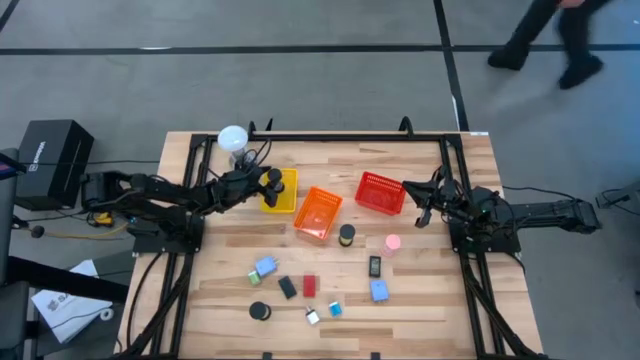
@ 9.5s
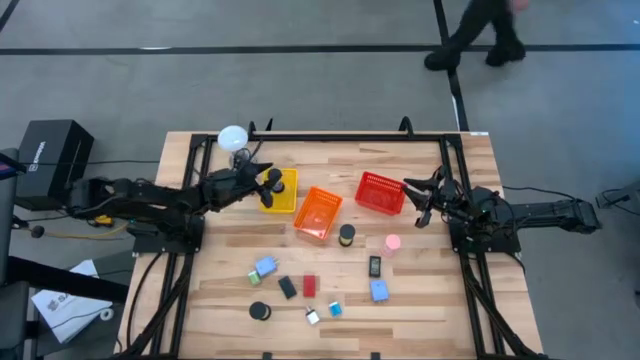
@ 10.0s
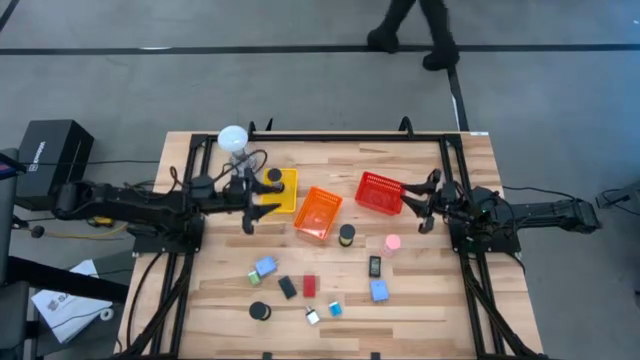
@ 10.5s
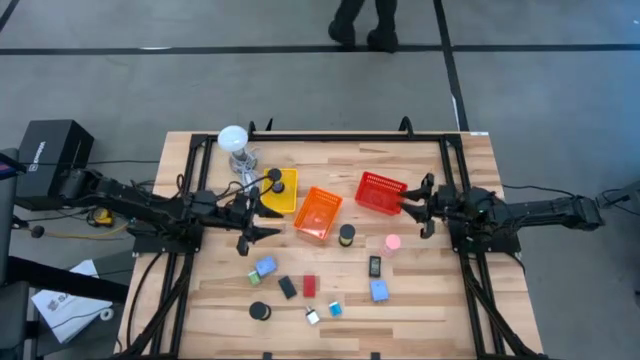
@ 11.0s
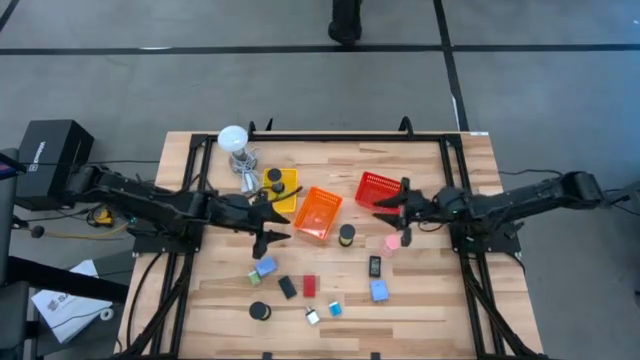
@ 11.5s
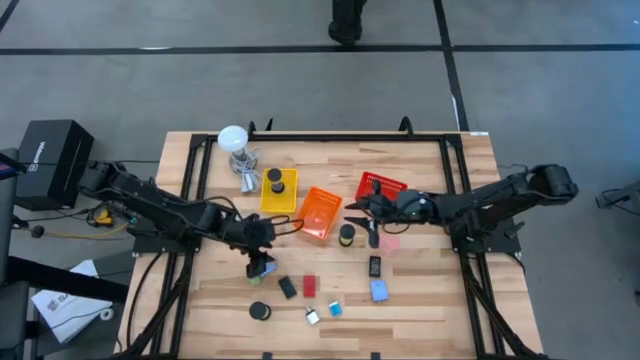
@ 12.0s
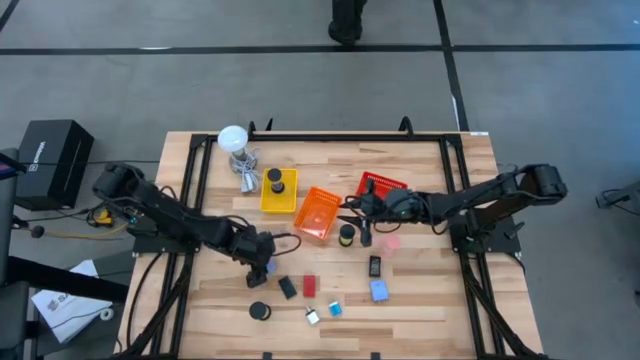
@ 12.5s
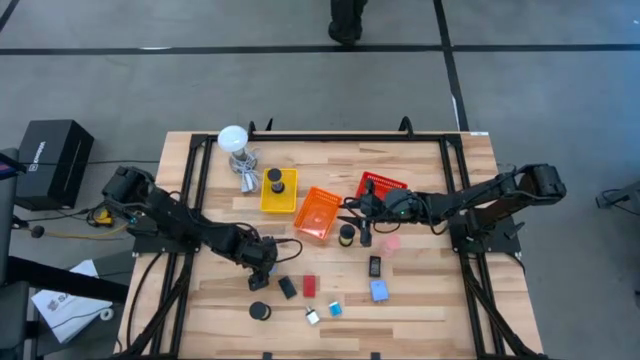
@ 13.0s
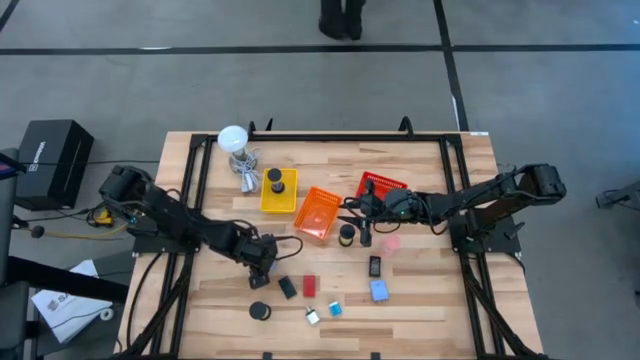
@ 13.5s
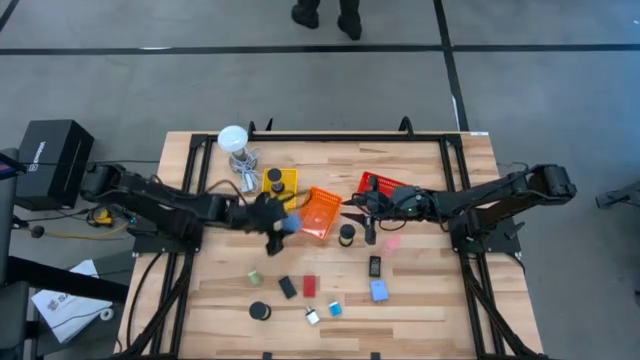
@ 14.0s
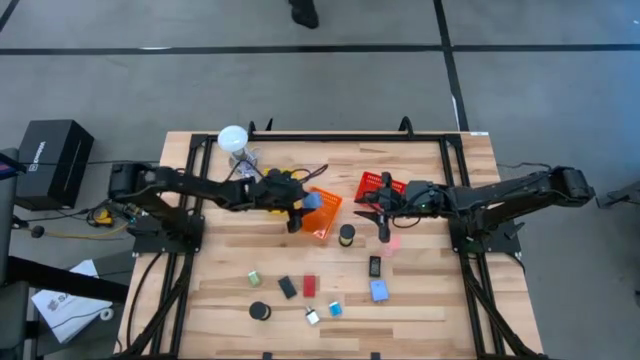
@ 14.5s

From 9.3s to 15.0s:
Task: Pick & Place Office items
Put the left light blue charger adapter into the orange bin

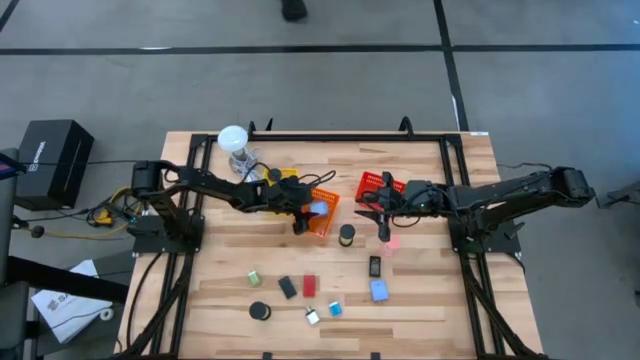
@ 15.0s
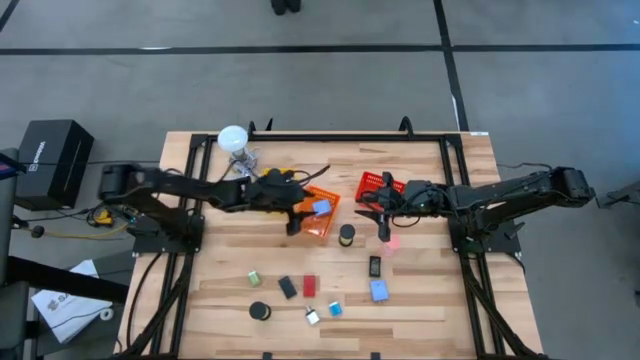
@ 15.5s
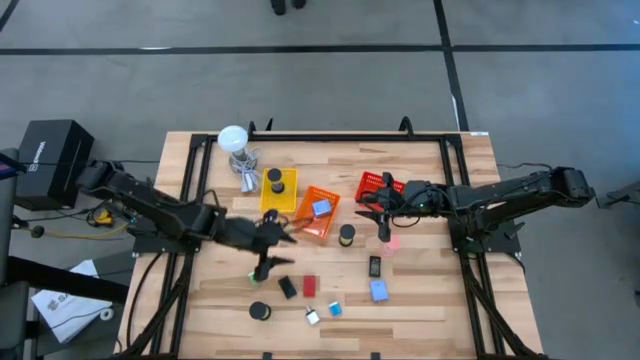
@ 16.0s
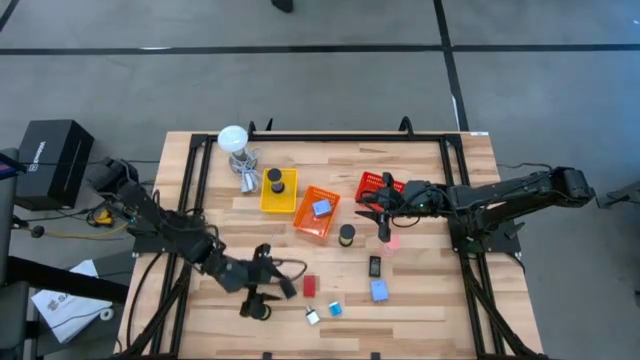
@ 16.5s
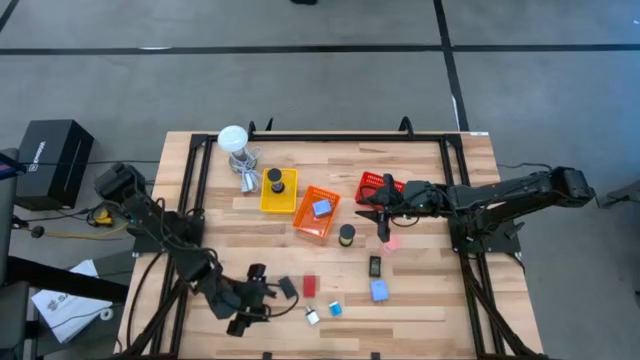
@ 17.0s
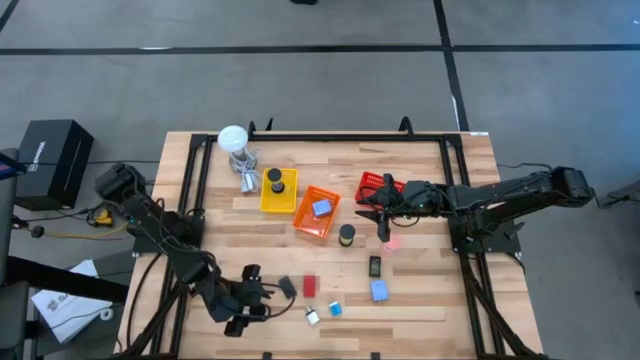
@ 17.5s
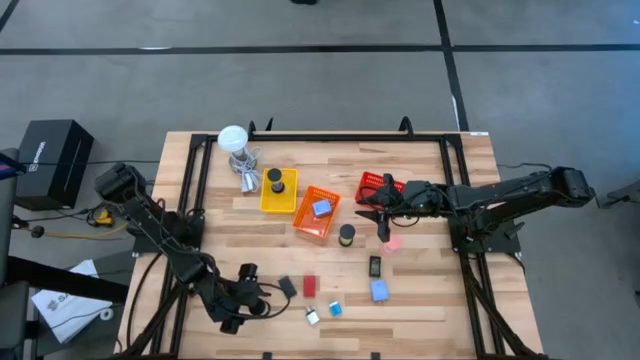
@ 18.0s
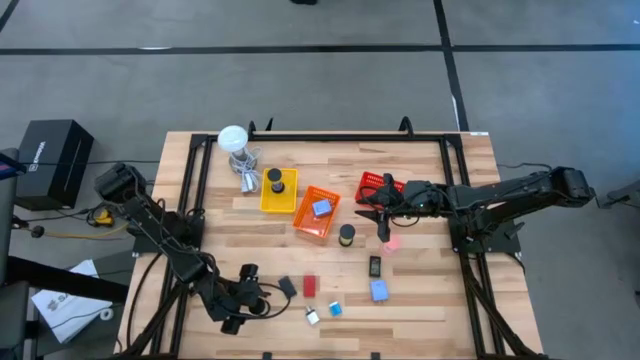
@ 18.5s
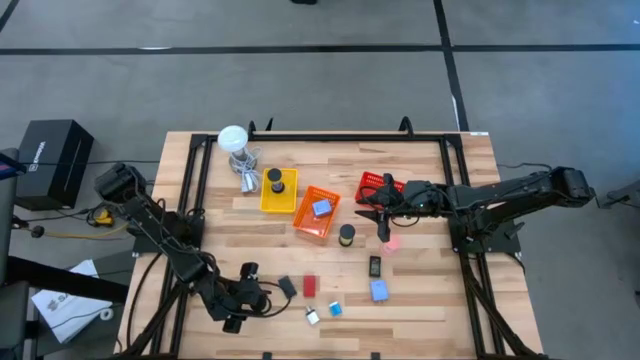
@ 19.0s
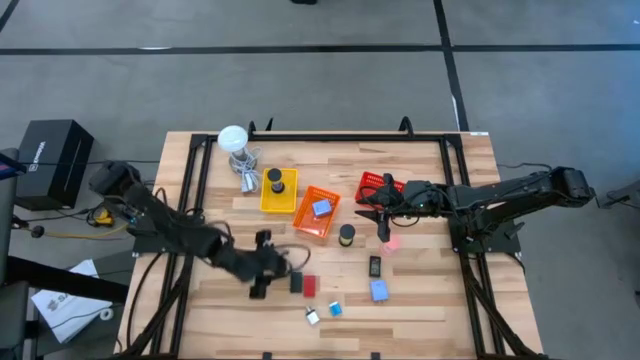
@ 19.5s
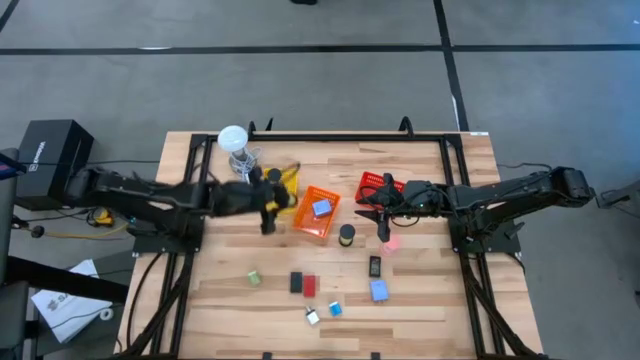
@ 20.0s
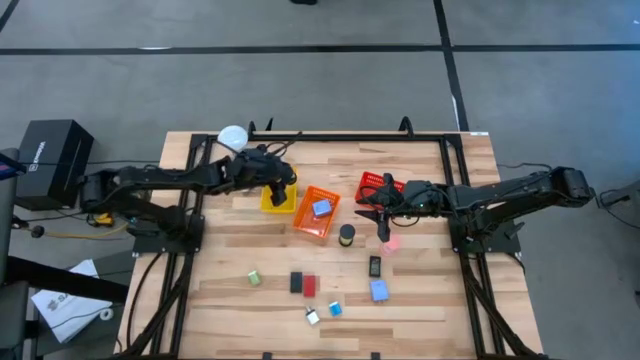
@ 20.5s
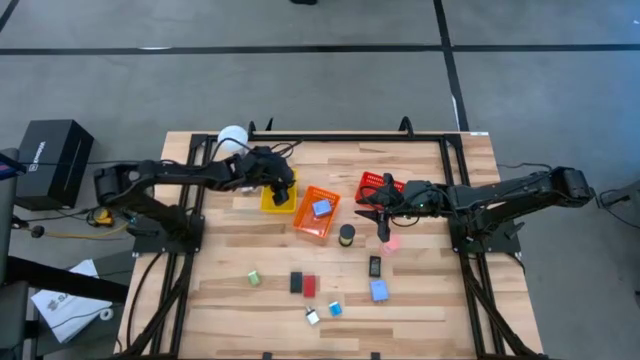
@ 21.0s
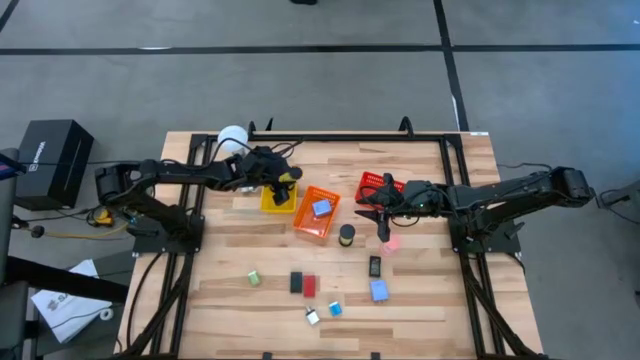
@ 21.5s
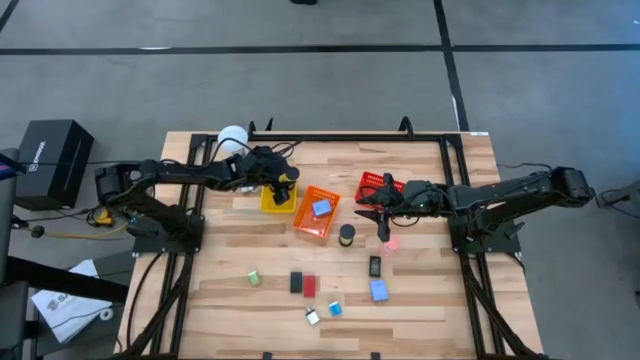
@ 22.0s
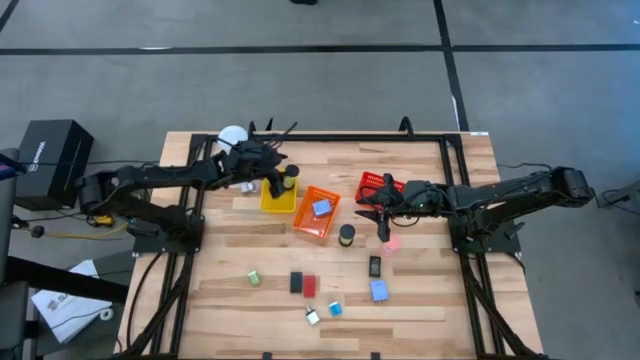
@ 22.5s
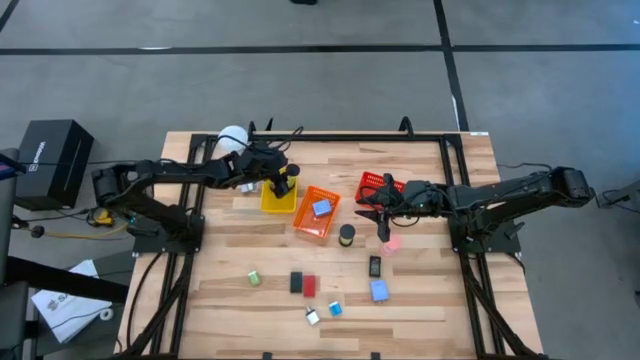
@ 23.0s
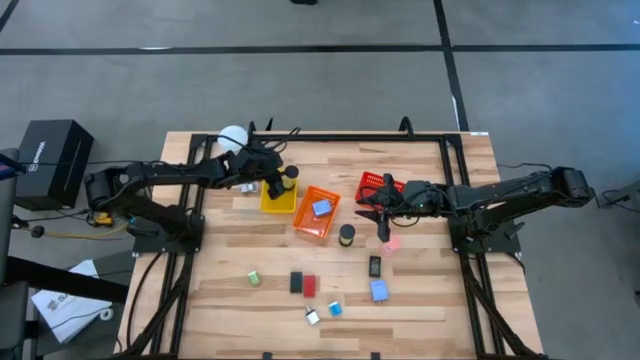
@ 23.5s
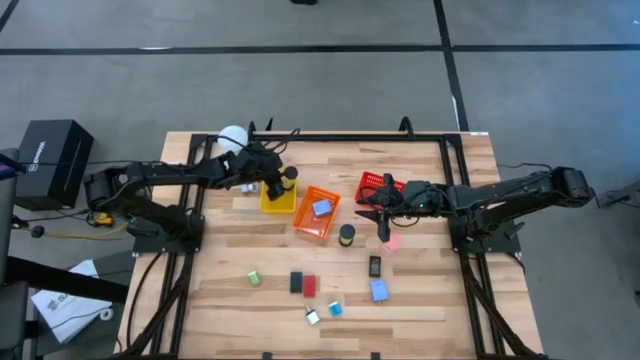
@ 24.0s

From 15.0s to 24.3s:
Put the bottom black sand timer into the yellow bin

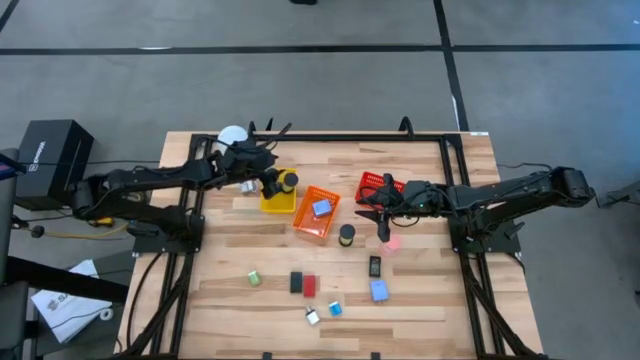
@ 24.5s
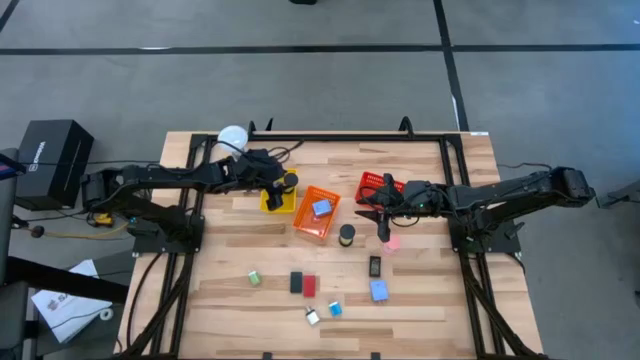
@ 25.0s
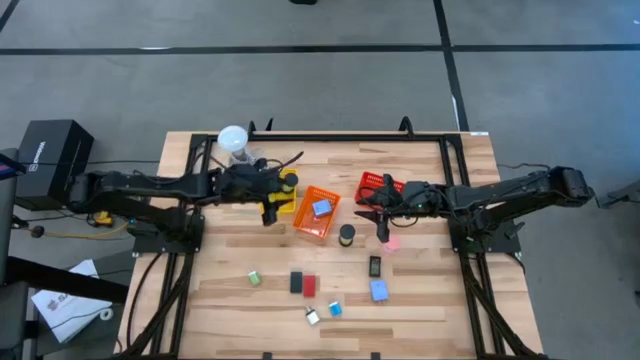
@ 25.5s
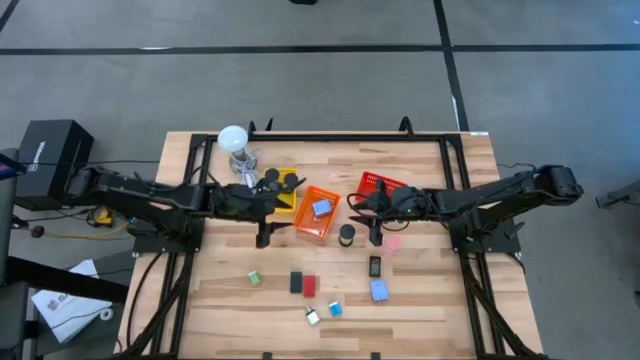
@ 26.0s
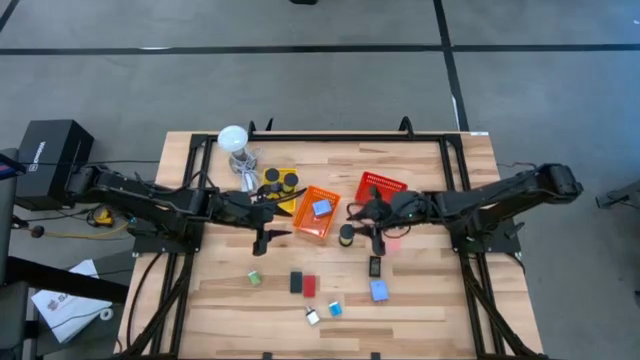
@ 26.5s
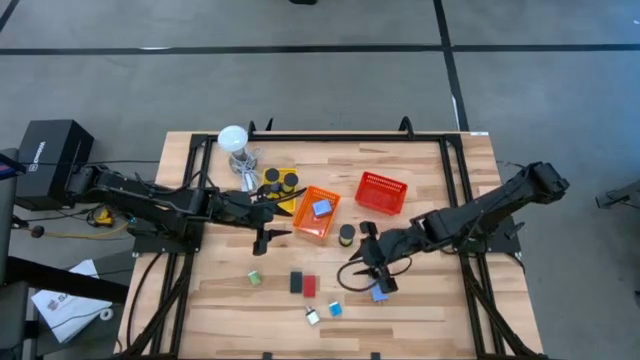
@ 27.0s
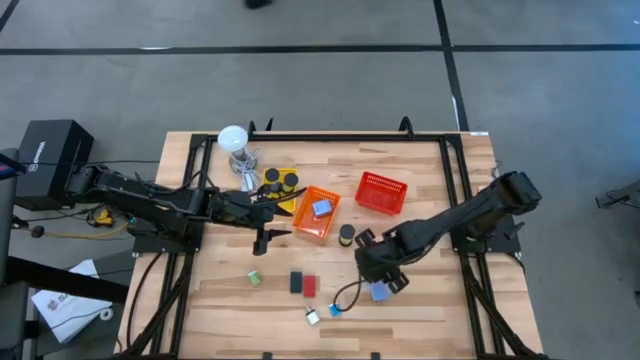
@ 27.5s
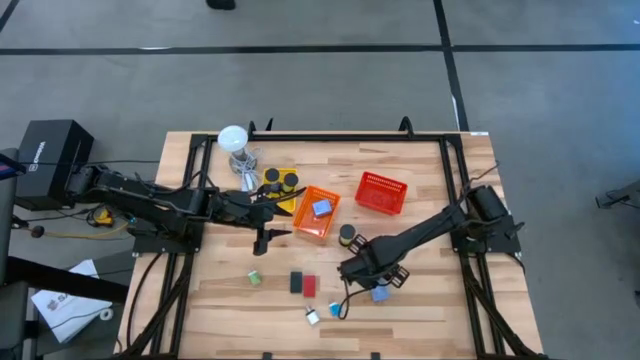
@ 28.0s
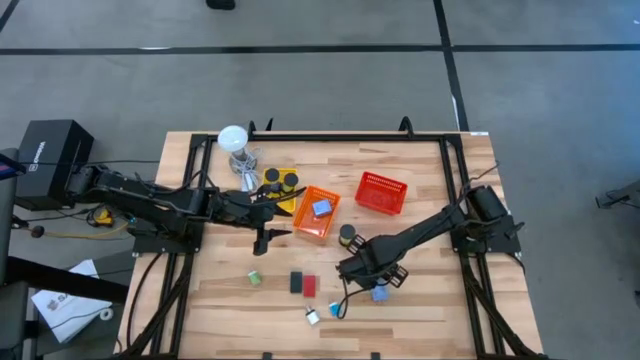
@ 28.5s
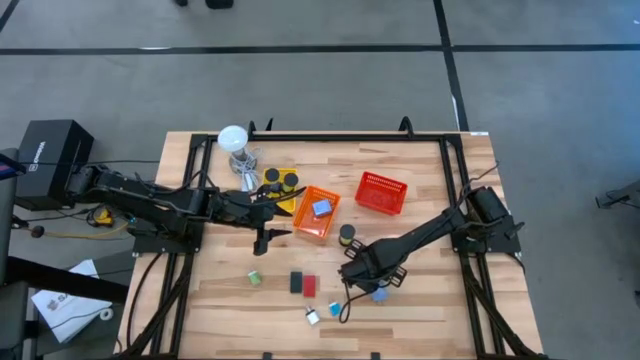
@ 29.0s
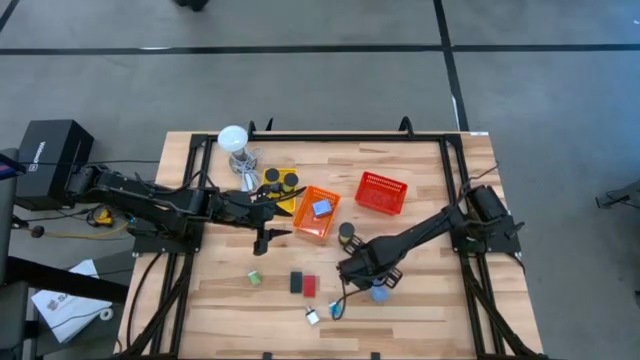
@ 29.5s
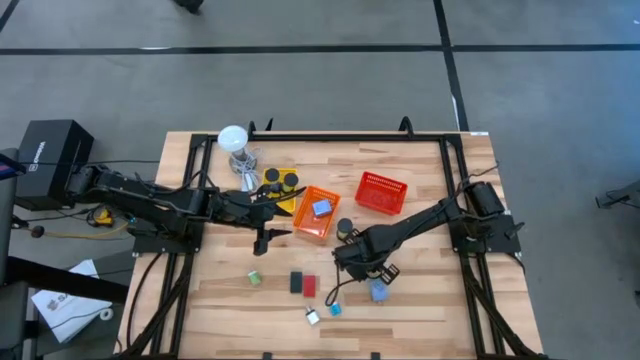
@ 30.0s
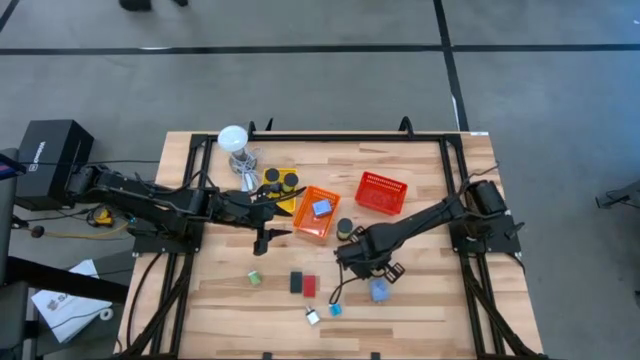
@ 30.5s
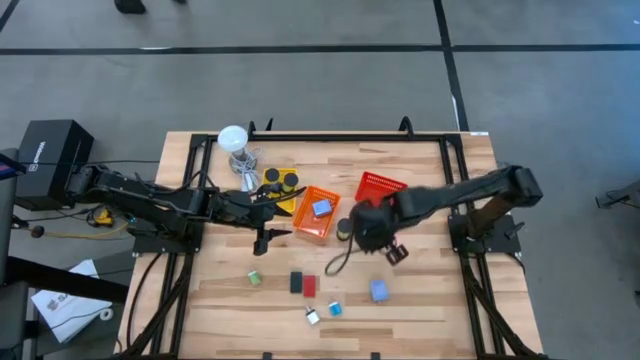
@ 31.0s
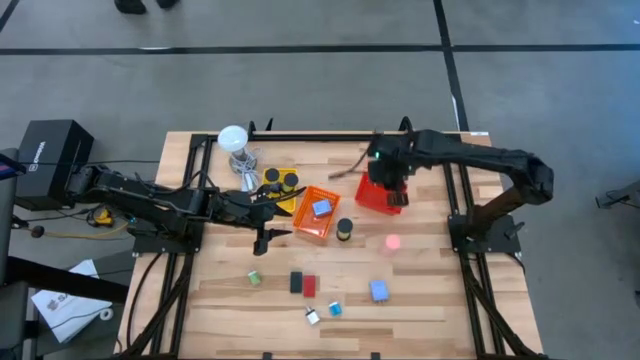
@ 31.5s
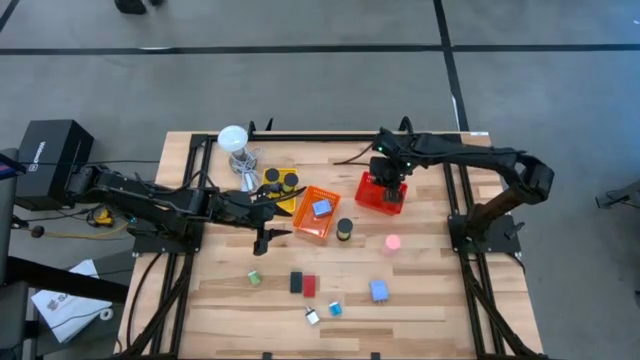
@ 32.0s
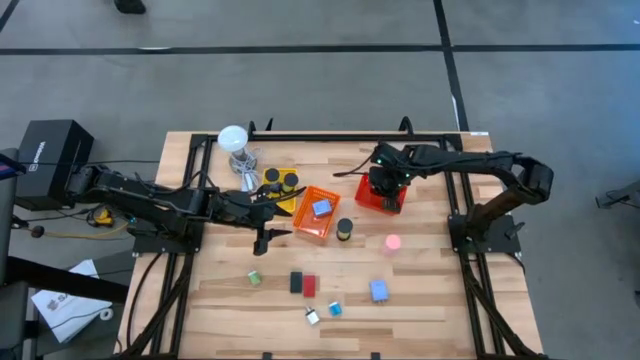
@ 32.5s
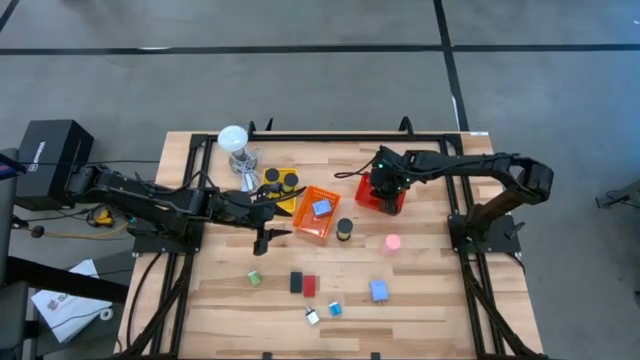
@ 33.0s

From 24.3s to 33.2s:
Put the right digital clock into the red bin
